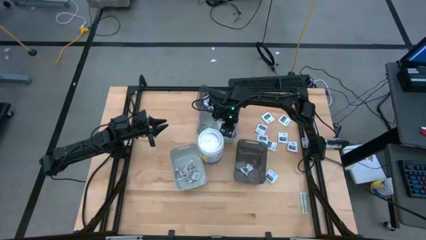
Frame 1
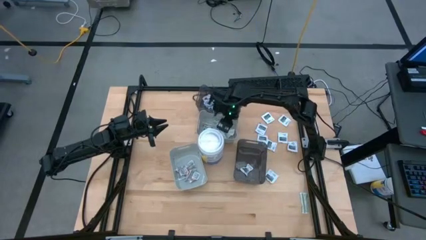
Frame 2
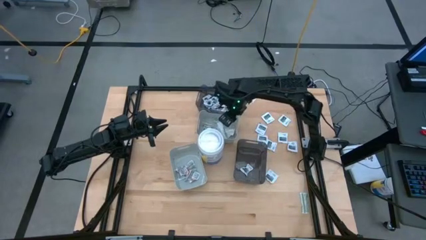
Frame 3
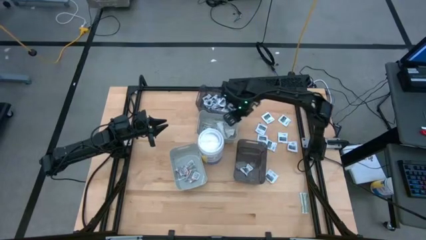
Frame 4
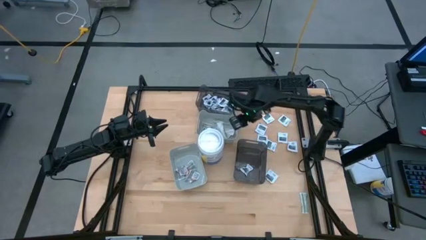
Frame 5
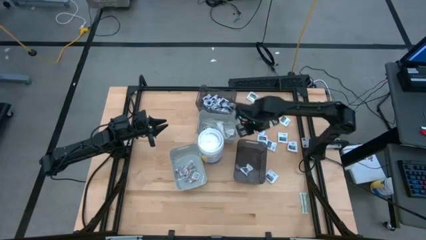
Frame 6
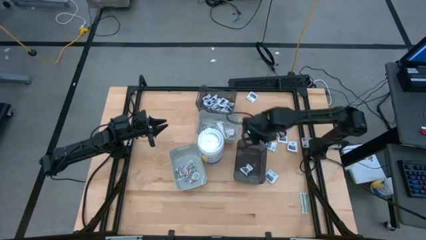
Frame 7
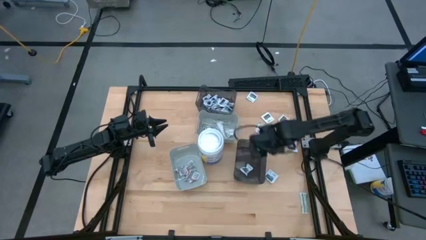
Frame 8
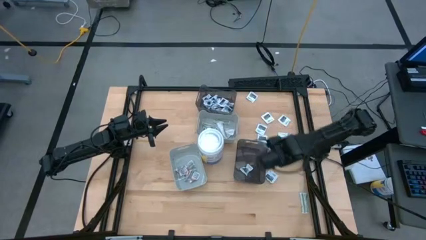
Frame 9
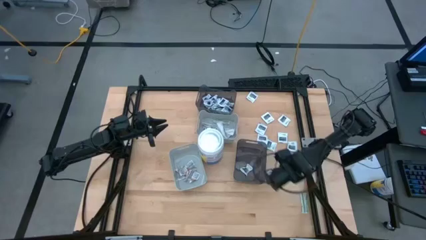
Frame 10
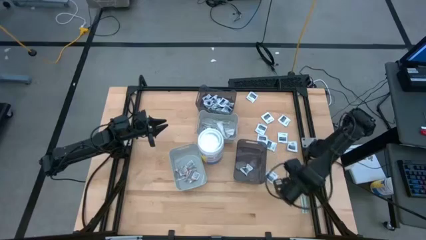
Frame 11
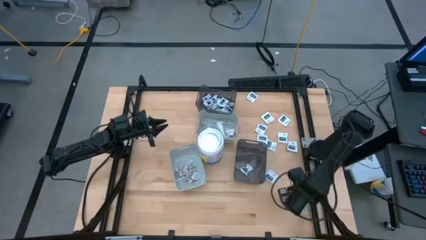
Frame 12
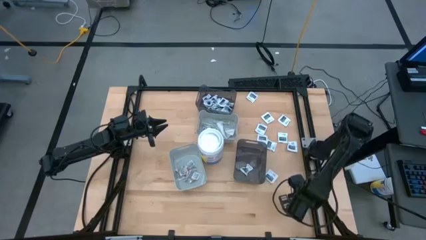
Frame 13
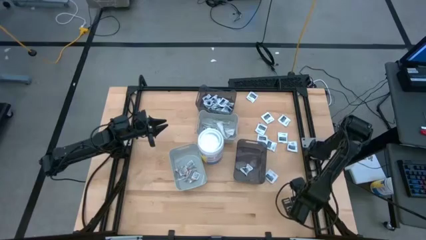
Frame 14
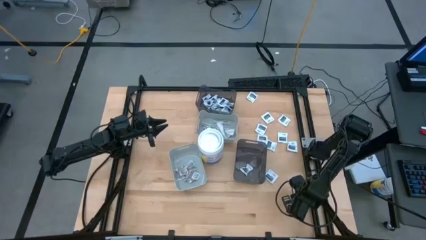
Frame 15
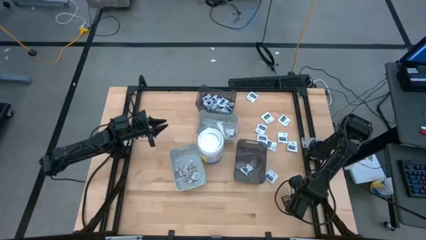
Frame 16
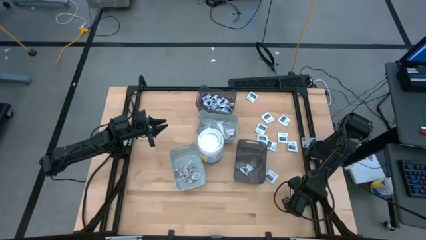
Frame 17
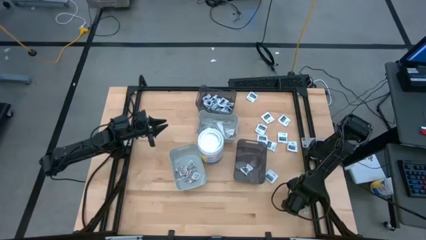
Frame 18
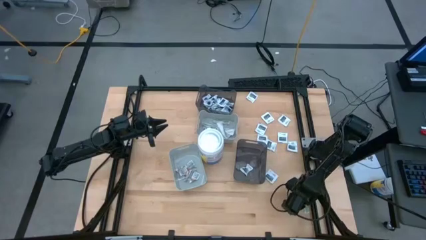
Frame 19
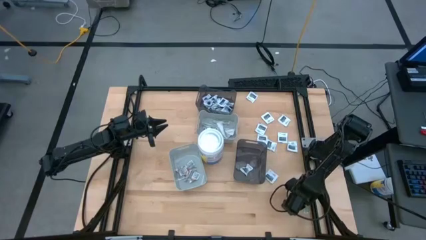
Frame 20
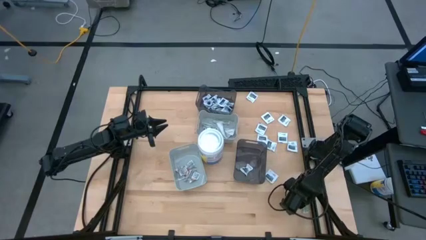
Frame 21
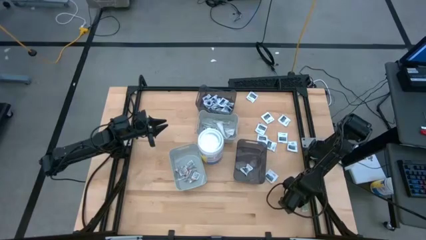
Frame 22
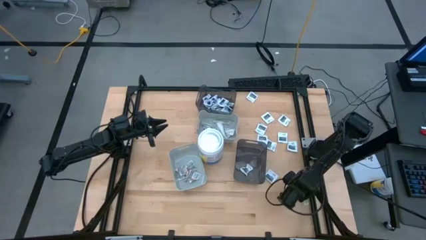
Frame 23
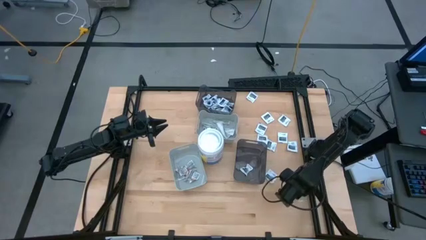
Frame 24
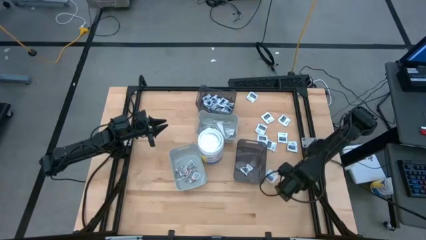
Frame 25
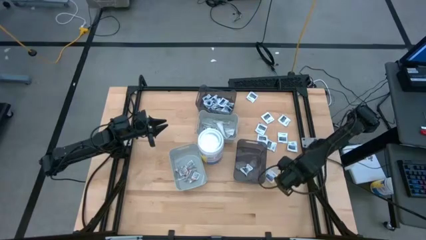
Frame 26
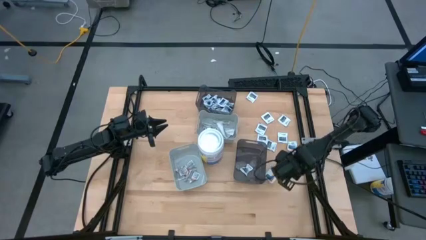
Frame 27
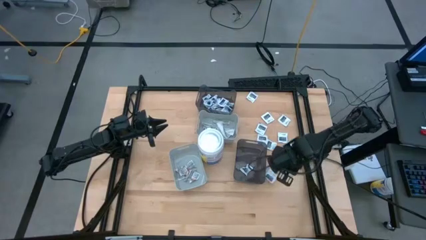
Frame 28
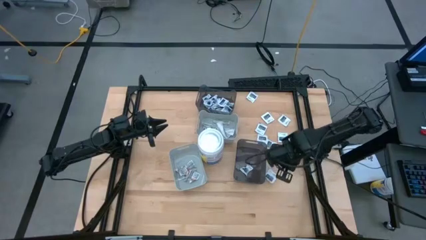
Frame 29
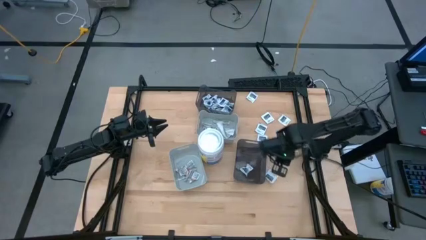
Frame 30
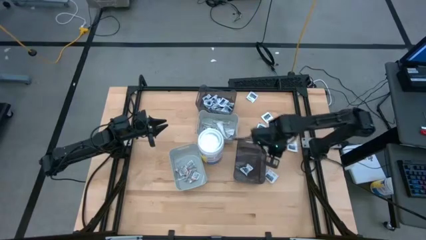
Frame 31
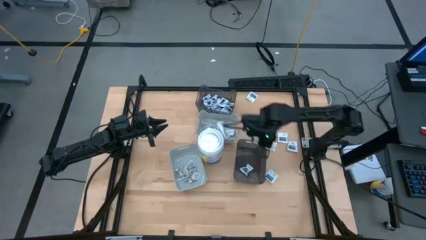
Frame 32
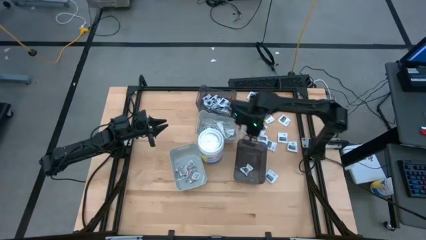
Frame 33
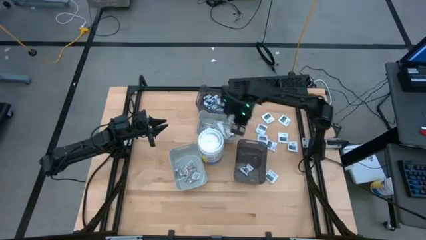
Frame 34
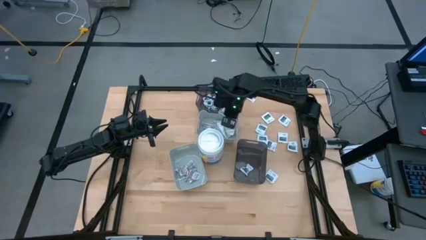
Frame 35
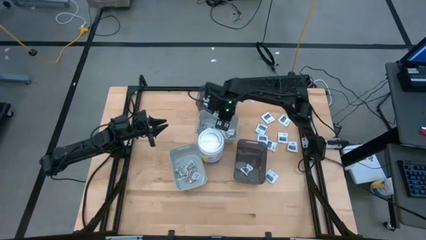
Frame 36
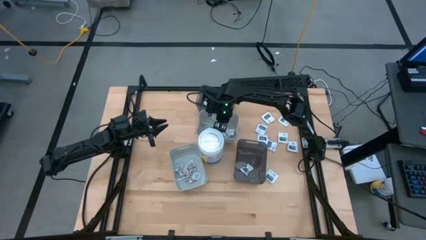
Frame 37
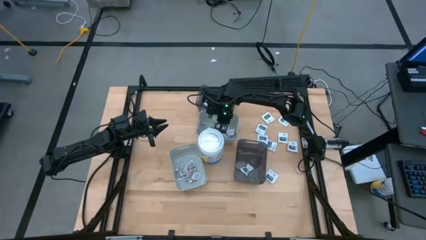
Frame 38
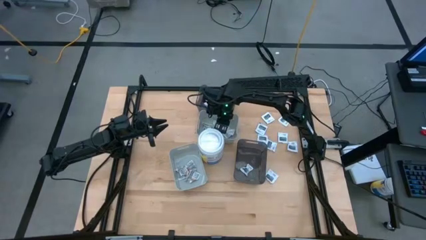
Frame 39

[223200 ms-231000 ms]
Task: Pick & Place First Aid Supplies
Put the bandage into the top gray bin

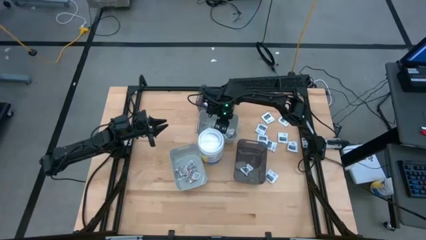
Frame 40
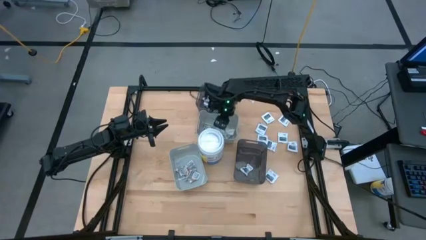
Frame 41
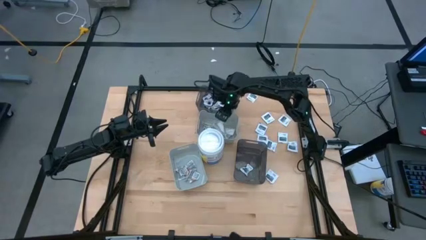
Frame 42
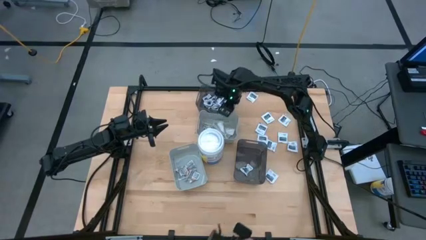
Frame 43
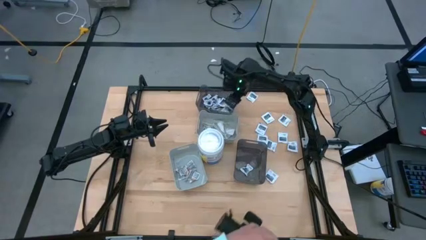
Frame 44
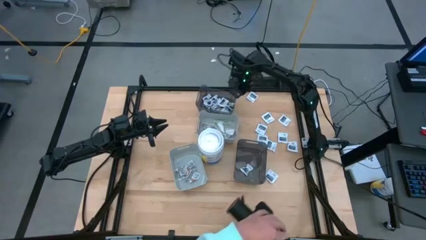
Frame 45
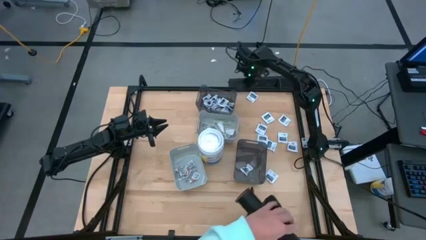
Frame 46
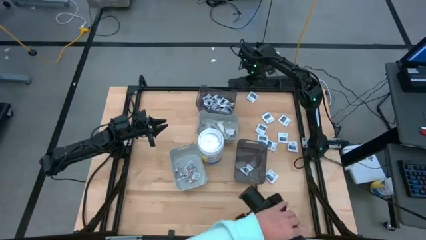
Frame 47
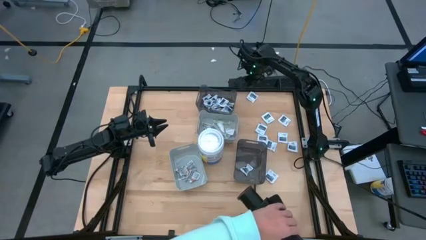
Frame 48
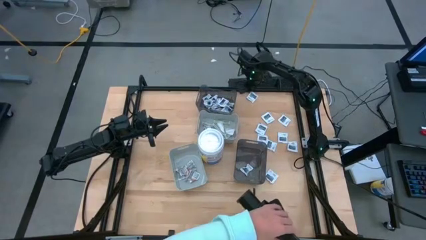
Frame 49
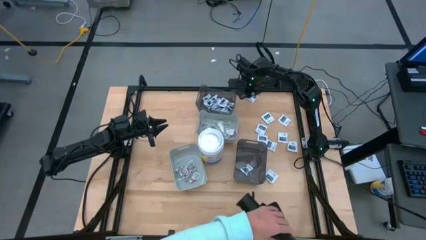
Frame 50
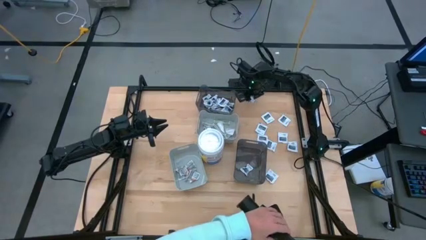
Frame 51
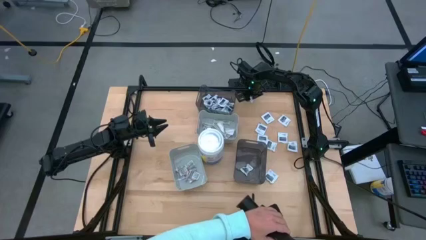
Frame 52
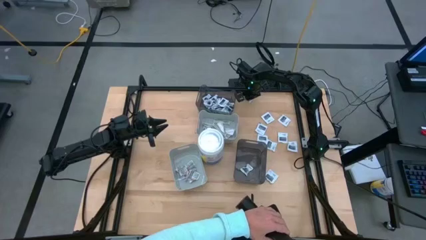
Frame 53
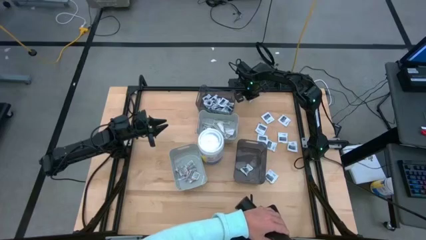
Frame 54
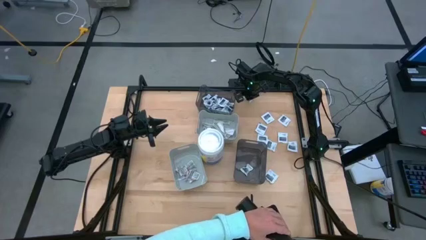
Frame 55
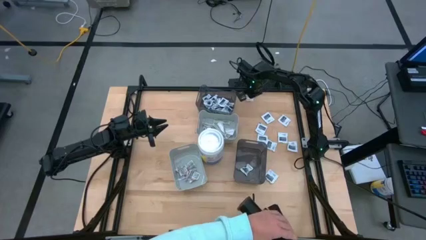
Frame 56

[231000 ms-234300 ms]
Put the towelette pack into the bottom transparent black bin

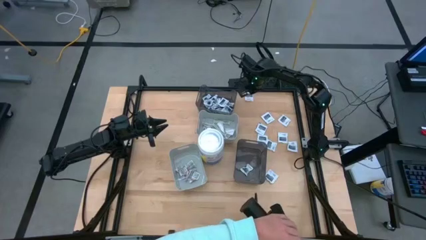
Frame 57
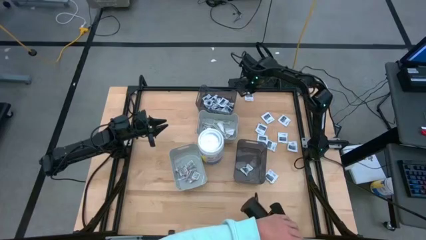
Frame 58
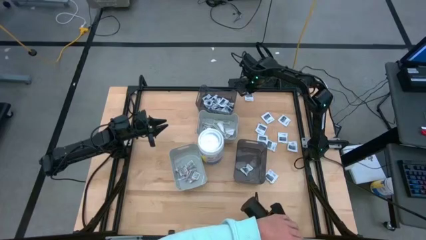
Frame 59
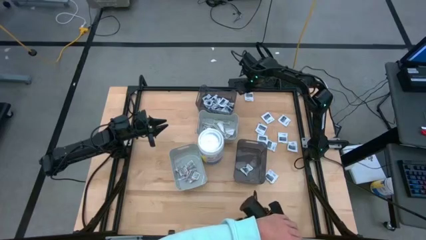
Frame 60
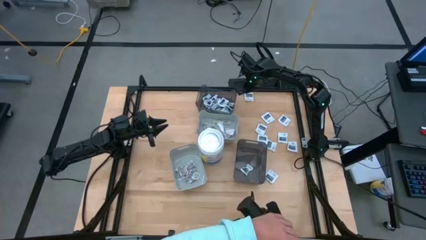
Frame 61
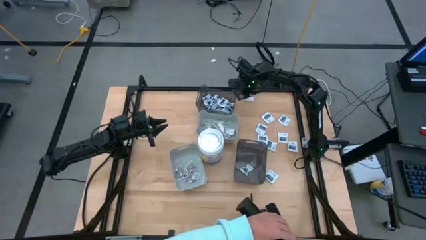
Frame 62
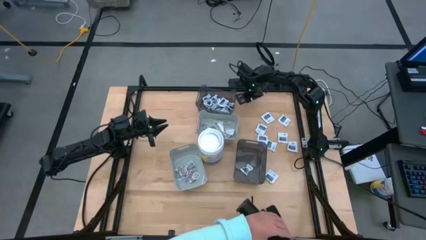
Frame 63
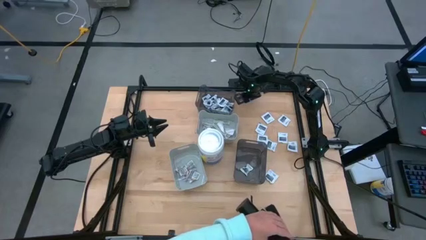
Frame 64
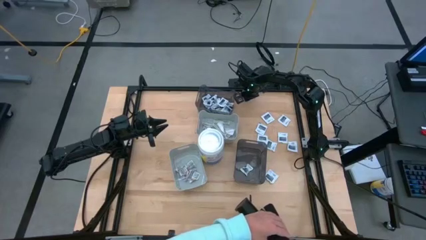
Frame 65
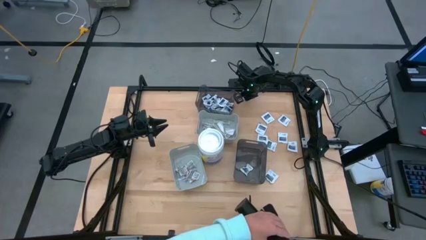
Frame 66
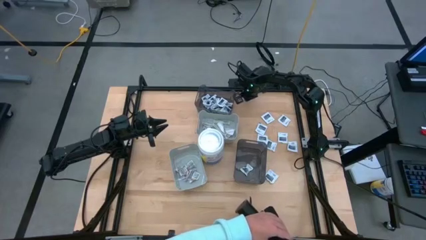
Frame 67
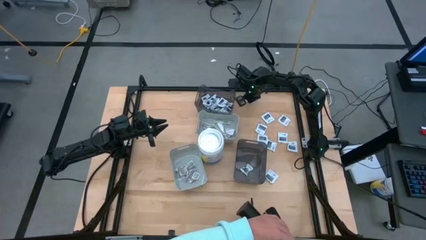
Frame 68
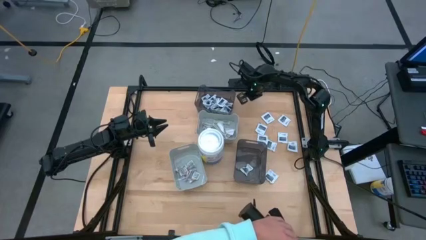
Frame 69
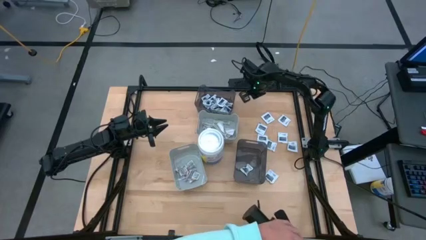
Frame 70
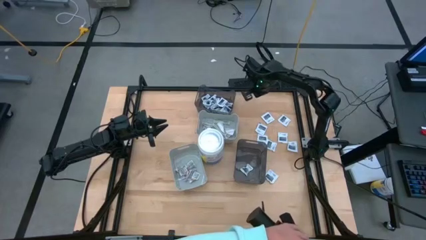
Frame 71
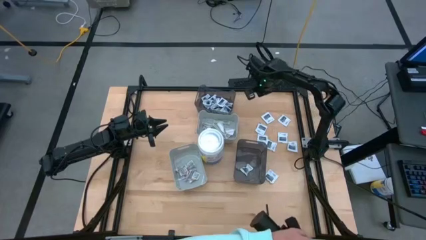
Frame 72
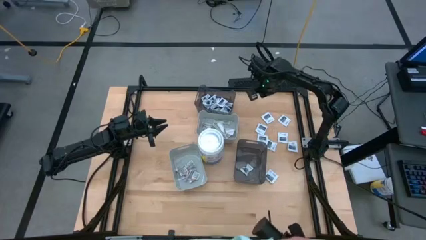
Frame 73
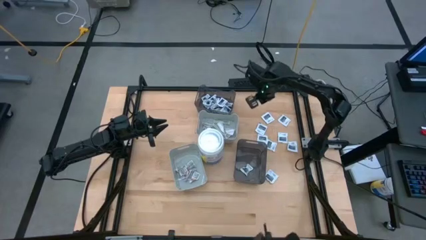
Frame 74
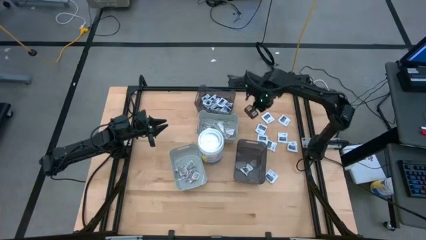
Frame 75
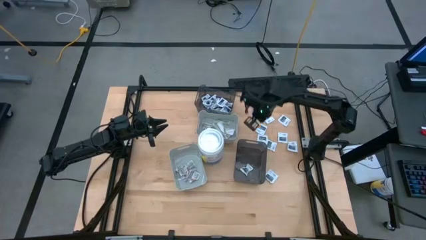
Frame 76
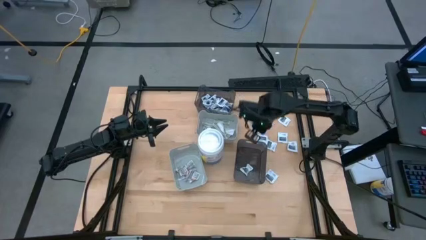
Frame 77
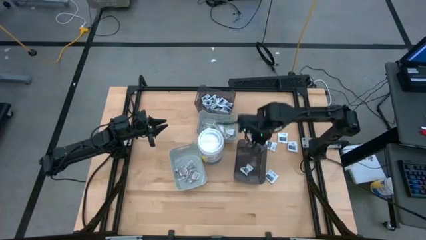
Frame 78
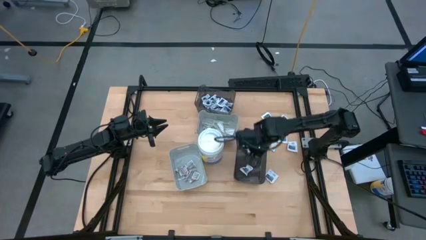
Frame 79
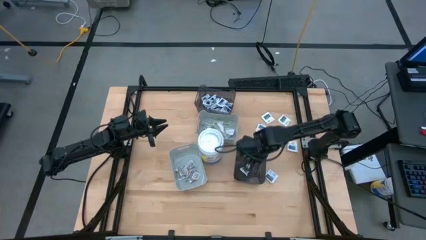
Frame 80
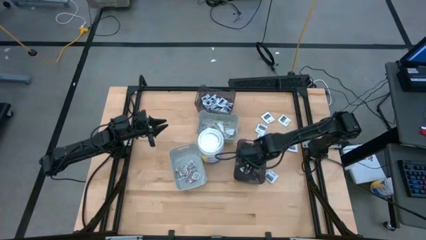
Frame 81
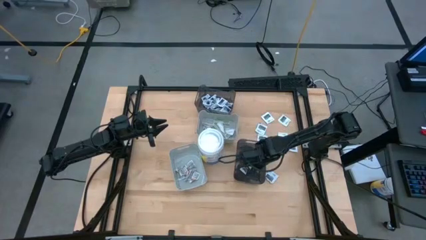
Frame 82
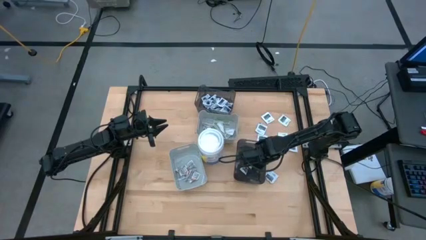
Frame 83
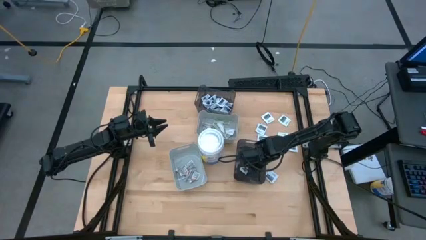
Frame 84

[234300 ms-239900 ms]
Put the towelette pack into the bottom transparent black bin
